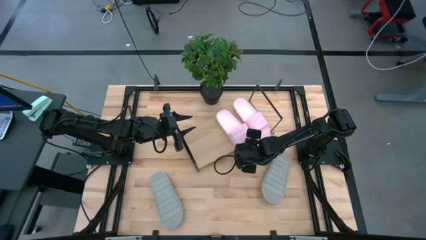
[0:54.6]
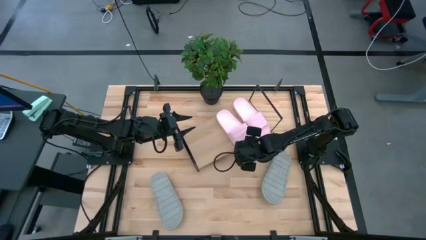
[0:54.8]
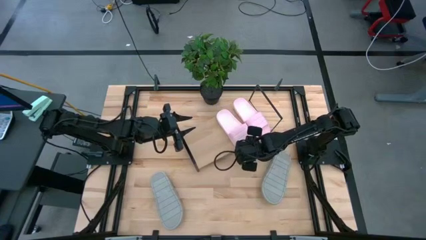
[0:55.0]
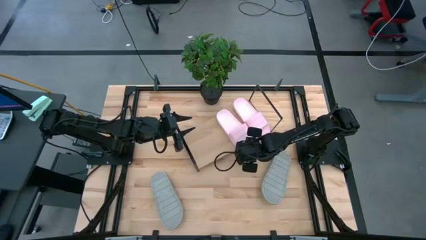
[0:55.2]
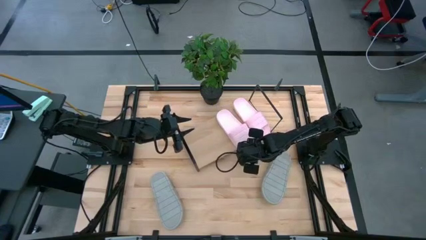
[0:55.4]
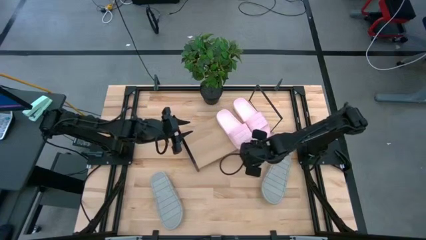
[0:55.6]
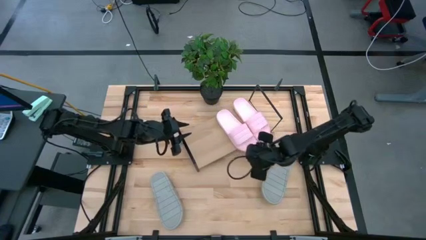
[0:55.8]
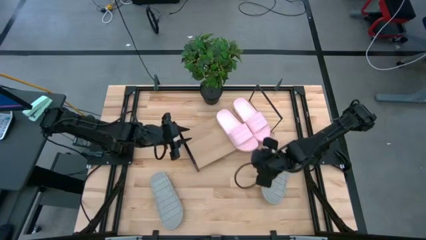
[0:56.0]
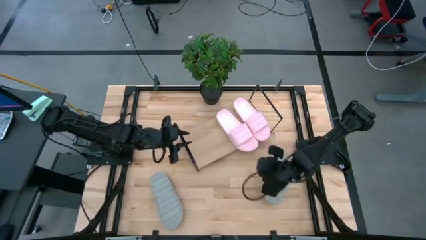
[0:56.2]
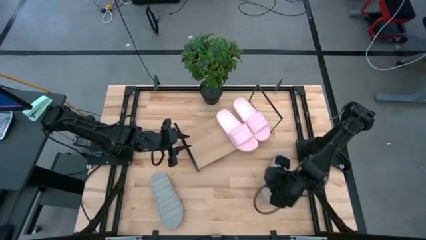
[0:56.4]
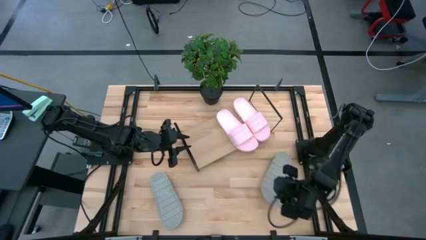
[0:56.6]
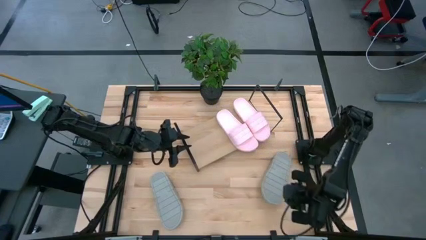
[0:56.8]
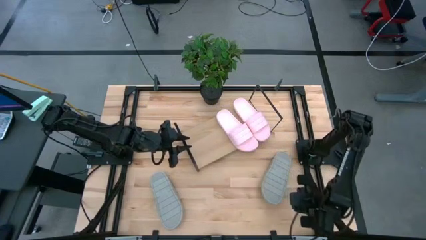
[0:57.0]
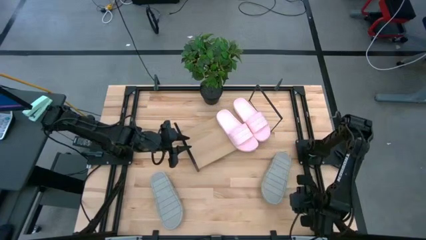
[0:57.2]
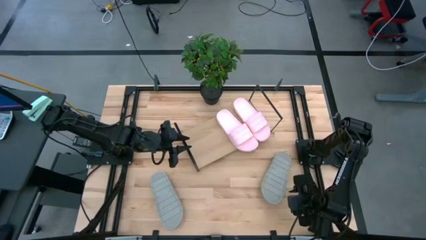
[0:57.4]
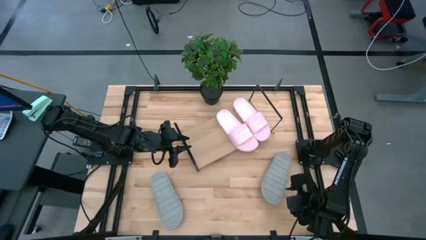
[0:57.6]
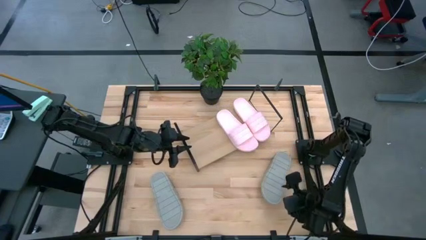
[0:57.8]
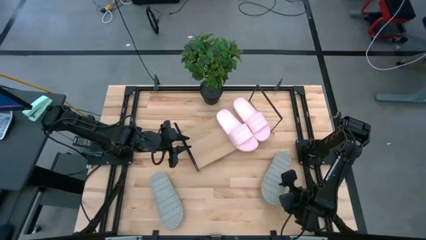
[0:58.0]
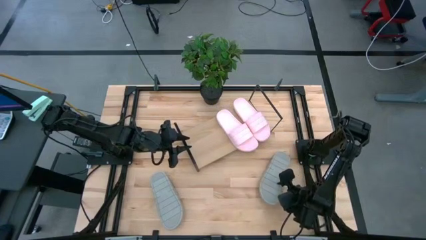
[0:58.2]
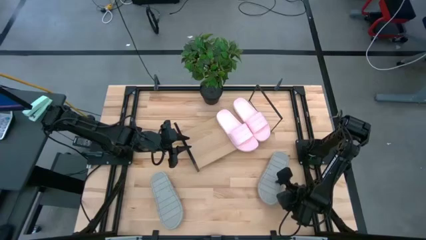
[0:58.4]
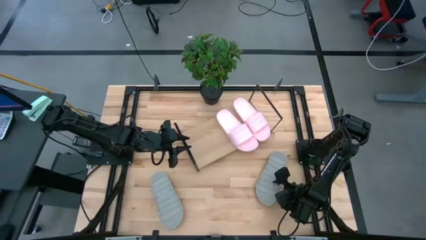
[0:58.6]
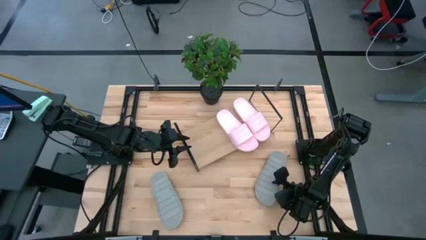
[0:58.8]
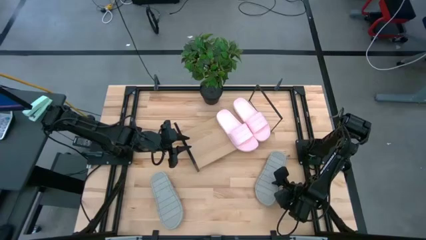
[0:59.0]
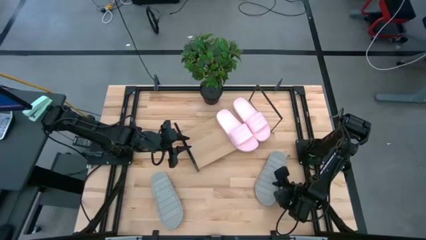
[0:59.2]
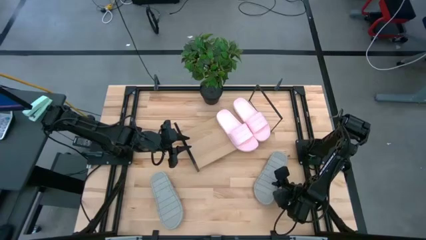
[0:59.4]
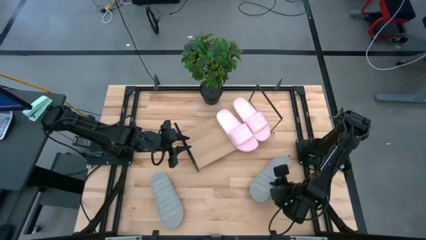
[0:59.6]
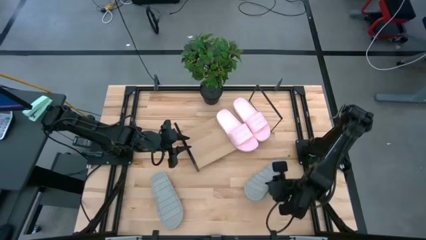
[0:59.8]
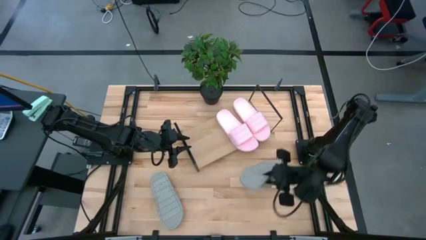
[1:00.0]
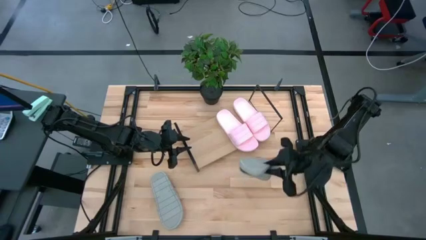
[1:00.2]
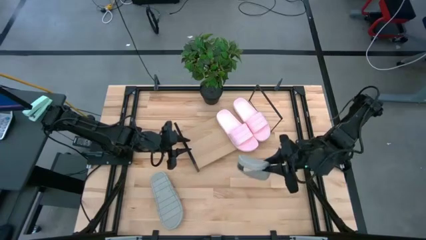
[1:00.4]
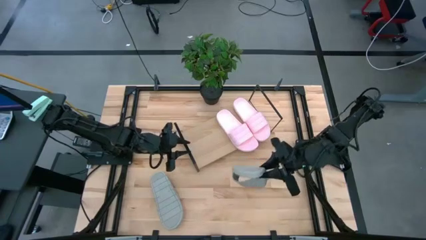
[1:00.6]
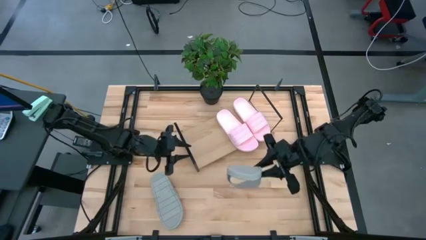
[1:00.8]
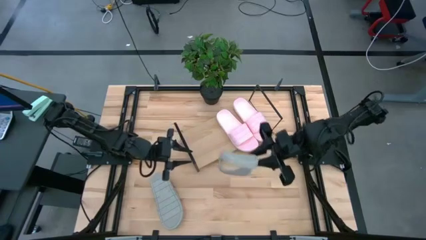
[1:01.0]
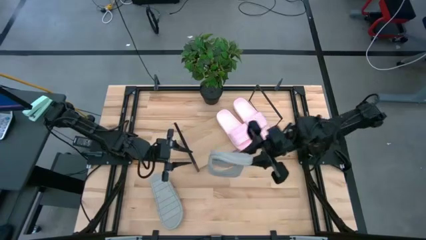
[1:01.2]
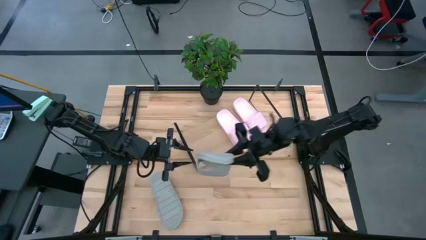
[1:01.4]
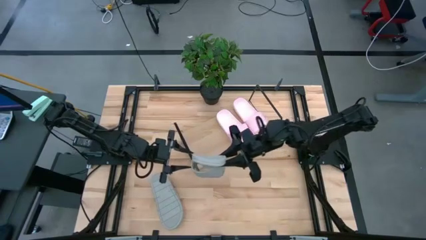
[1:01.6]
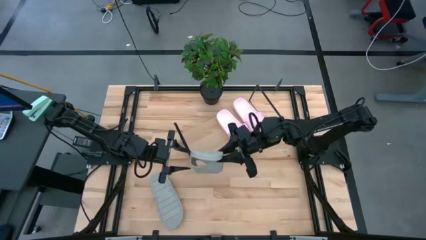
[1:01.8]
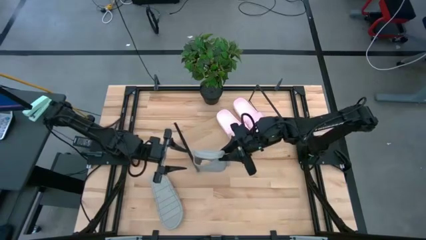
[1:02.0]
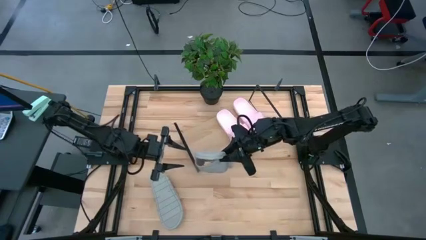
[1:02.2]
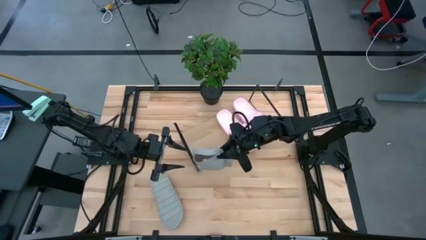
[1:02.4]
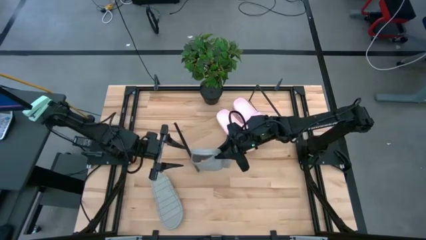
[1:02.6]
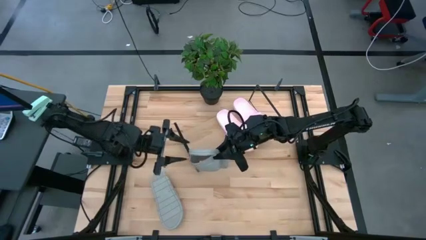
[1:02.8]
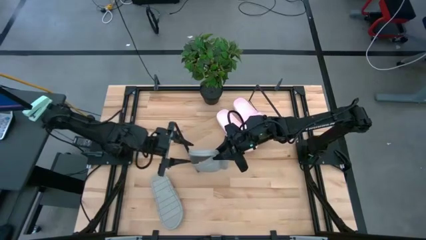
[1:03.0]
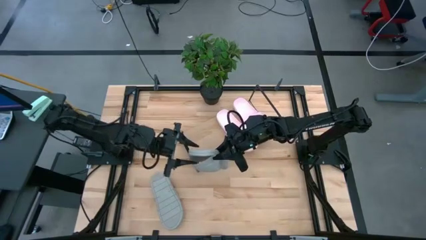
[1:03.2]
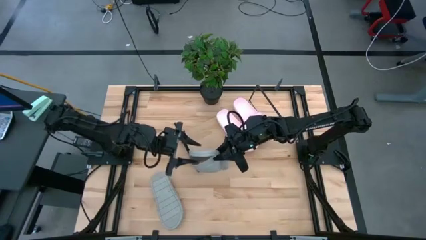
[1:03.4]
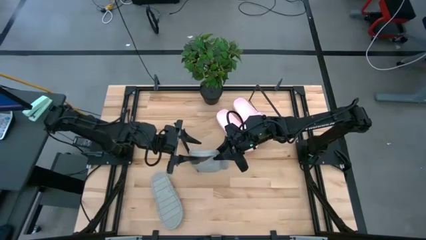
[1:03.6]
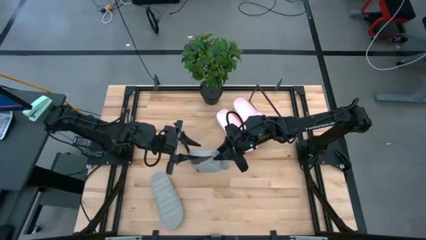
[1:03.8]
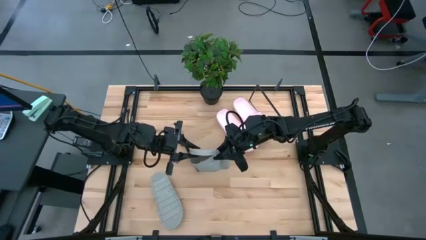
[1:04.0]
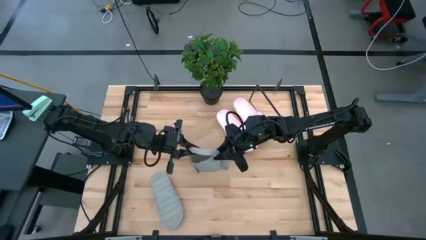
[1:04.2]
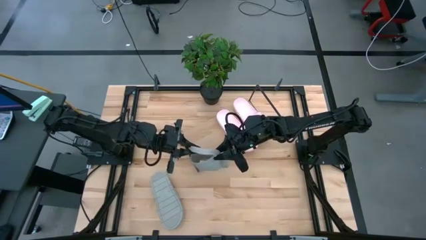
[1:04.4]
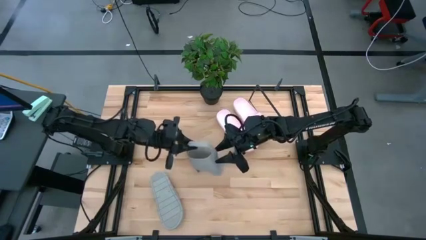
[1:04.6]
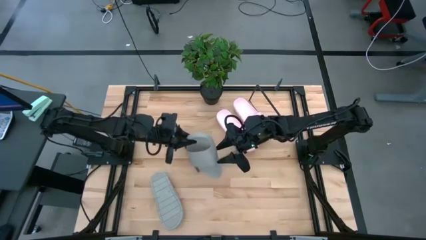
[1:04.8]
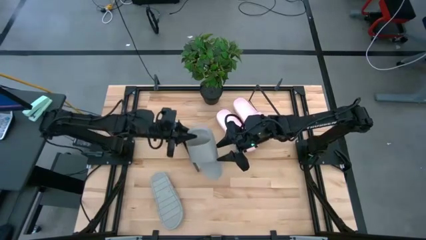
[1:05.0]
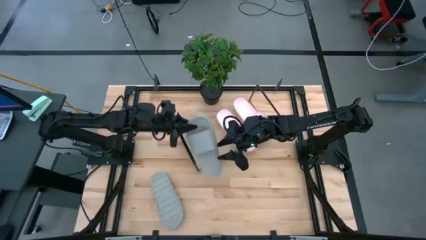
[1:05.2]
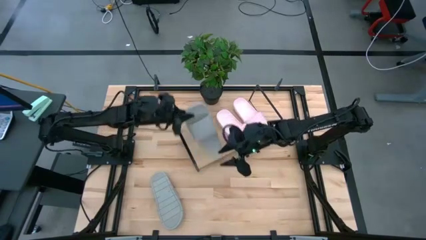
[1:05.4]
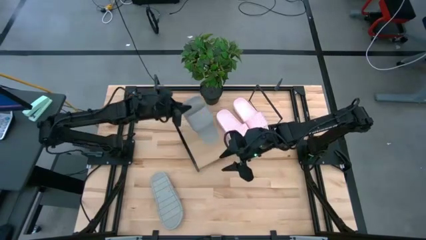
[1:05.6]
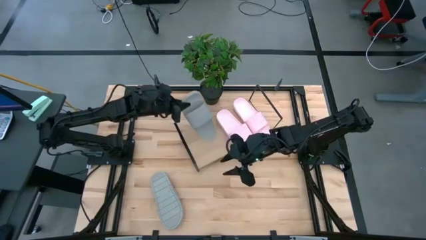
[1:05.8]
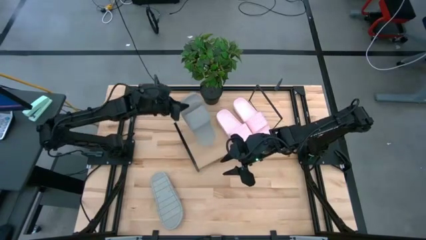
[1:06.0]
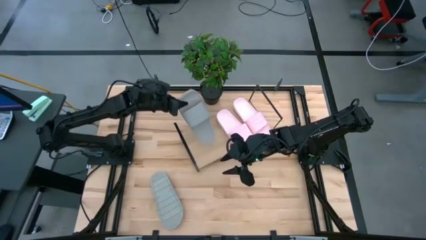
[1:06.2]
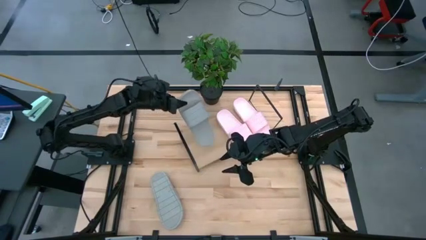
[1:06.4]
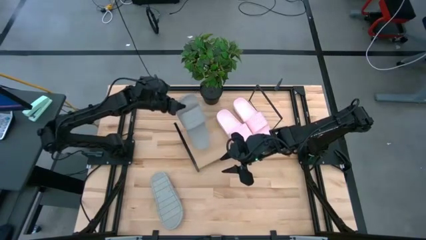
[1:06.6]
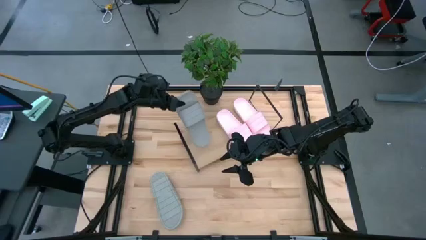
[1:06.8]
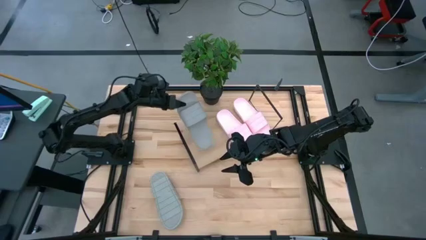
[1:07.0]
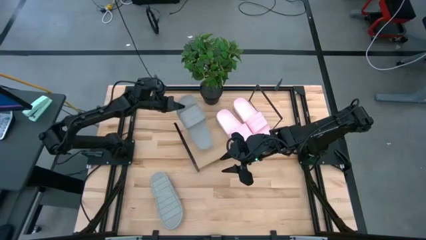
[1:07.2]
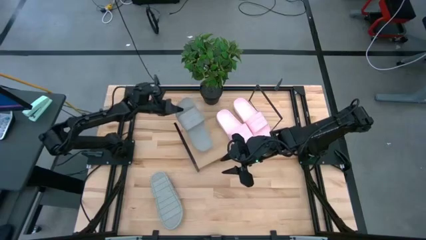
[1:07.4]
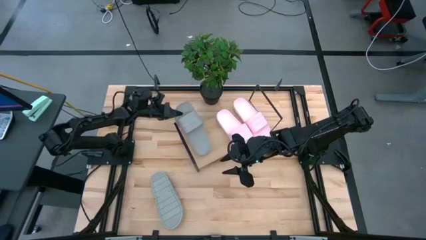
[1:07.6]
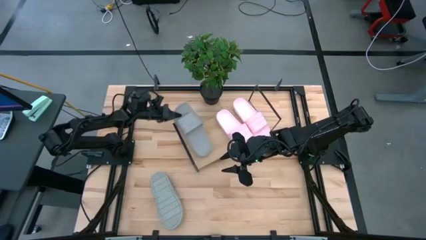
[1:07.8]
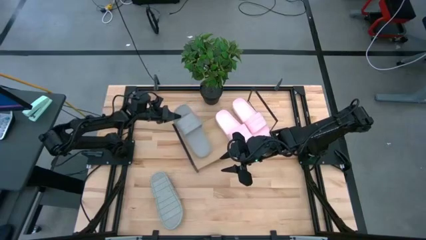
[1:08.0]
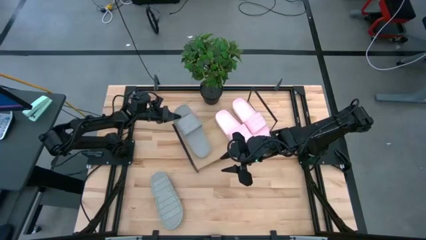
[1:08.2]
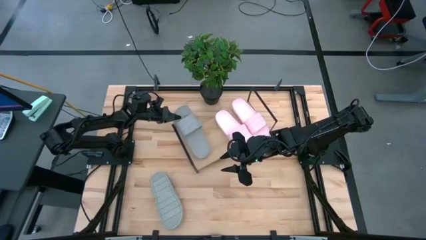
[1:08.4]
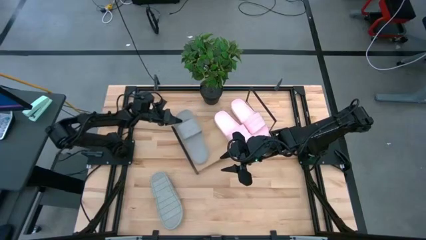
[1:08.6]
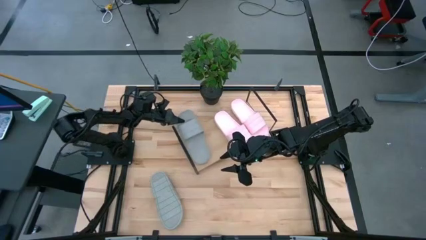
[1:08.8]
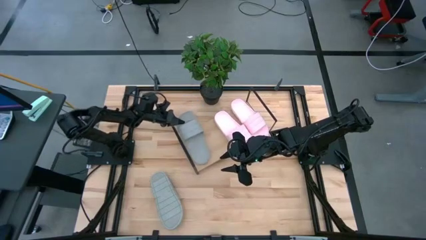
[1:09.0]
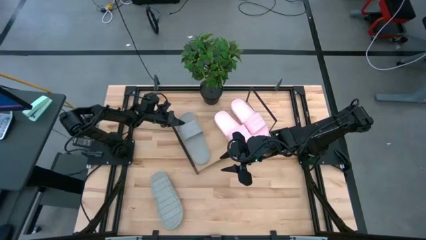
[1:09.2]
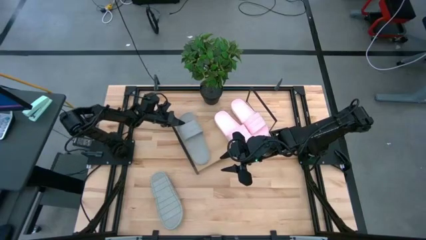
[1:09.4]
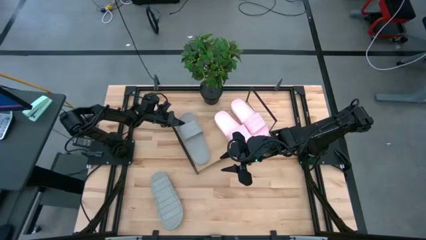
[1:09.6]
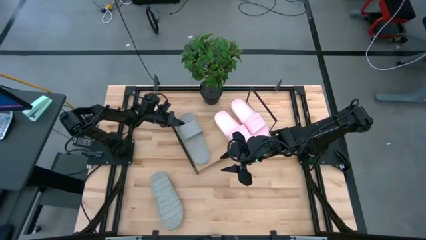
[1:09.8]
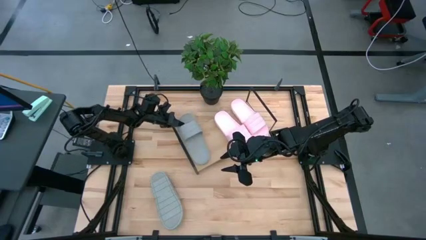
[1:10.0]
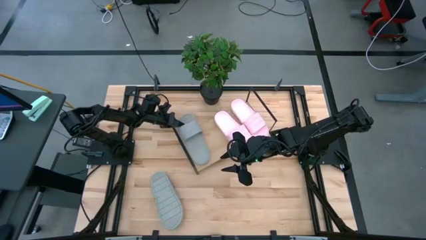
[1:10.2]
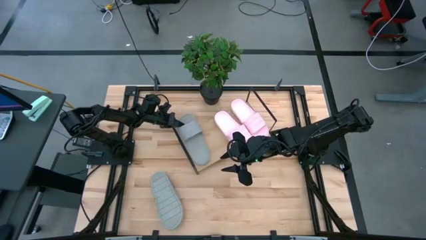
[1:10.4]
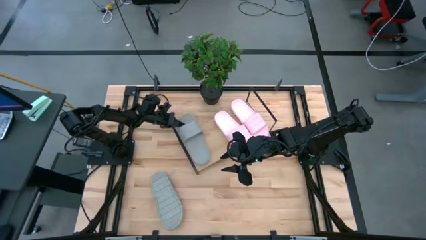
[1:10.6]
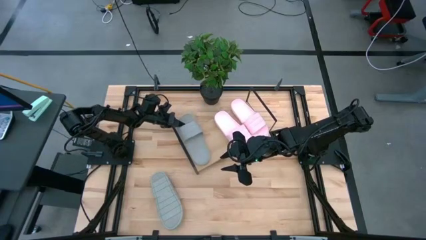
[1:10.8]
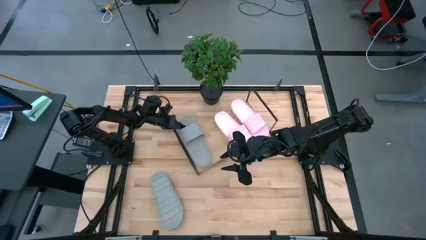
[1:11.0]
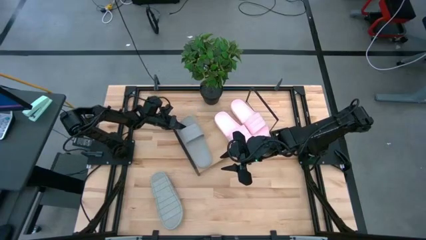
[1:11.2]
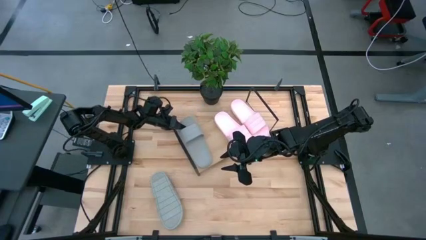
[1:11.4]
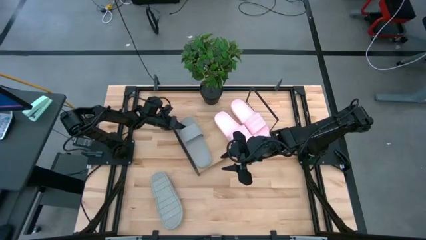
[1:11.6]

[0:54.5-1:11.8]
Task: Pick and place slides into the shelf
Put the right gray slipper on the shelf
